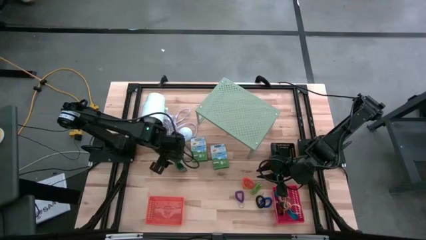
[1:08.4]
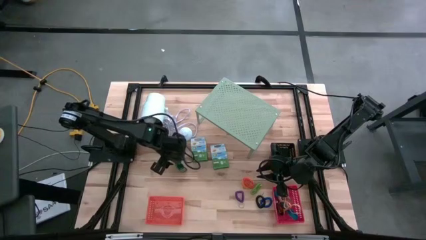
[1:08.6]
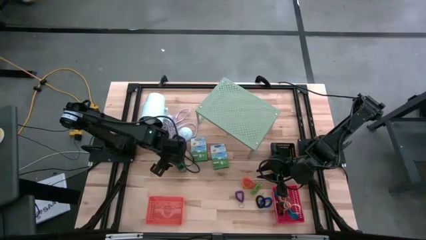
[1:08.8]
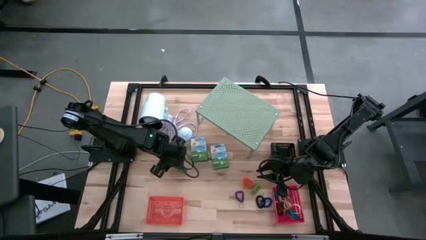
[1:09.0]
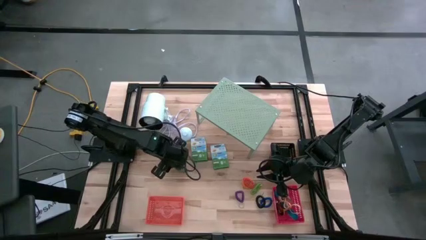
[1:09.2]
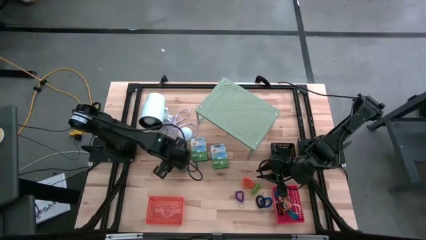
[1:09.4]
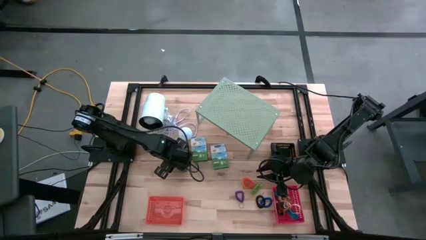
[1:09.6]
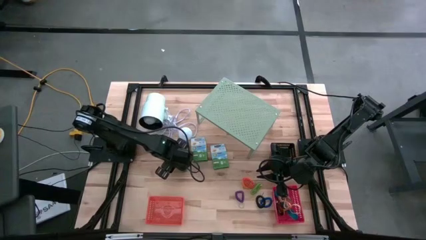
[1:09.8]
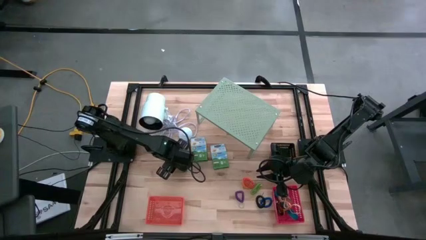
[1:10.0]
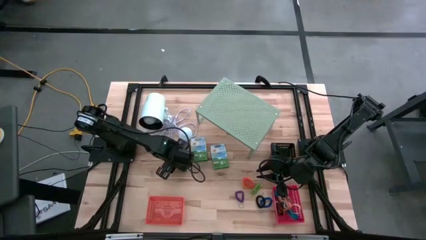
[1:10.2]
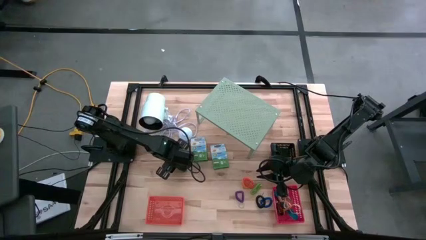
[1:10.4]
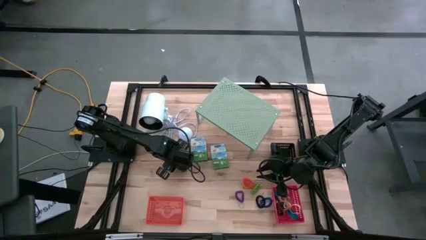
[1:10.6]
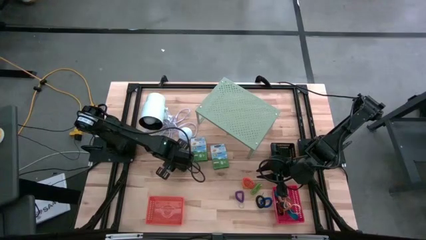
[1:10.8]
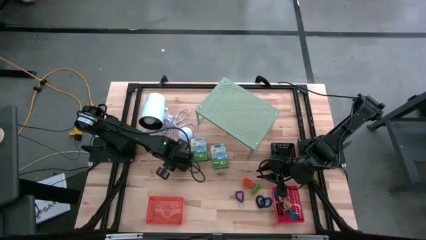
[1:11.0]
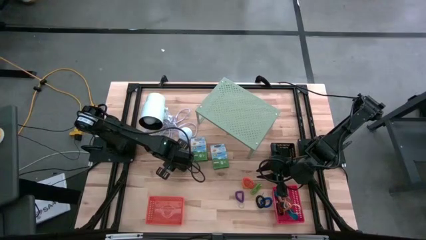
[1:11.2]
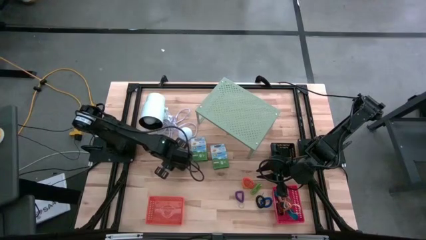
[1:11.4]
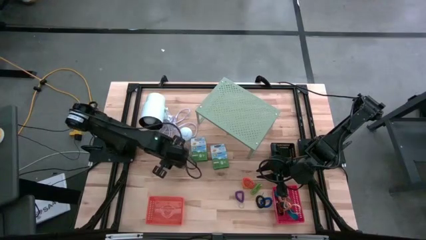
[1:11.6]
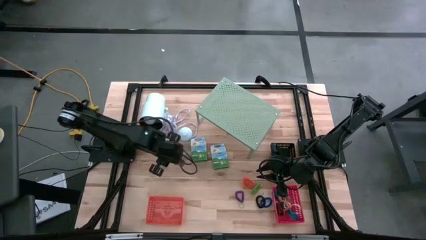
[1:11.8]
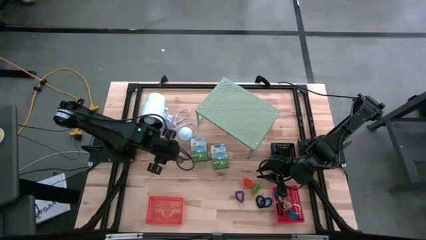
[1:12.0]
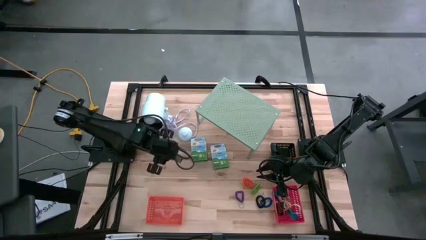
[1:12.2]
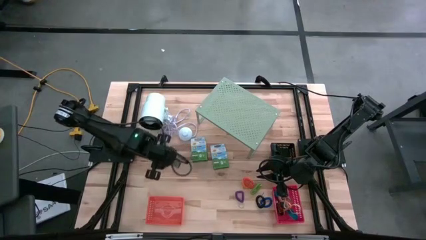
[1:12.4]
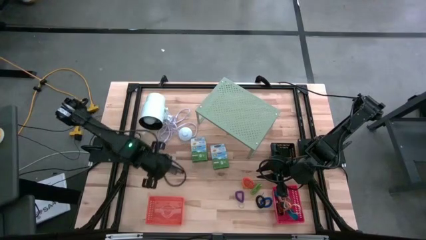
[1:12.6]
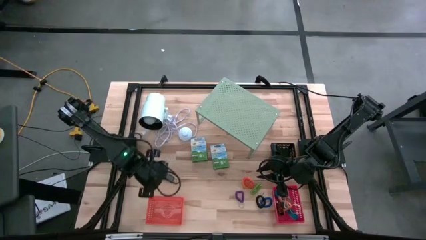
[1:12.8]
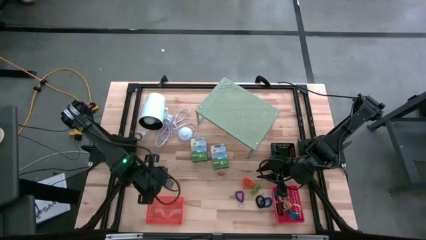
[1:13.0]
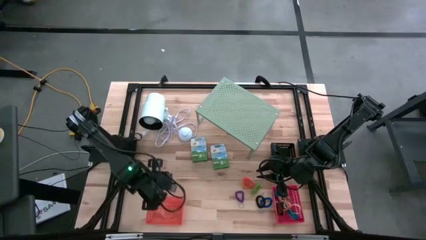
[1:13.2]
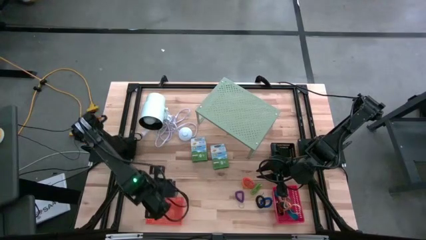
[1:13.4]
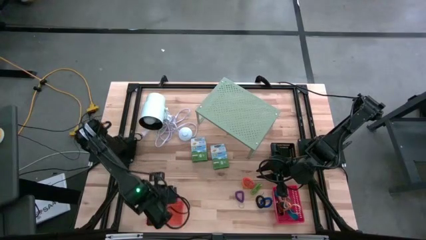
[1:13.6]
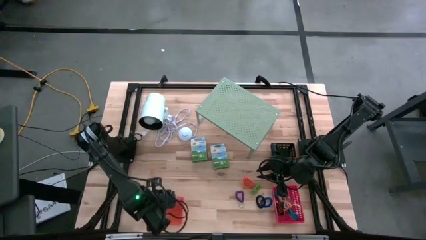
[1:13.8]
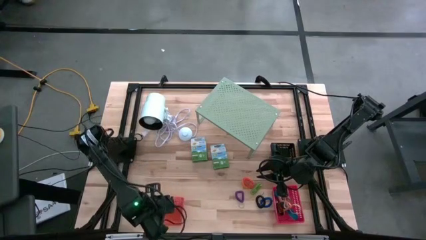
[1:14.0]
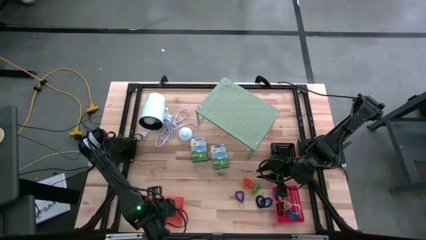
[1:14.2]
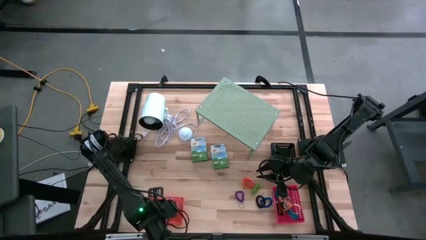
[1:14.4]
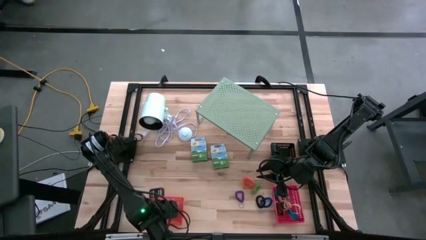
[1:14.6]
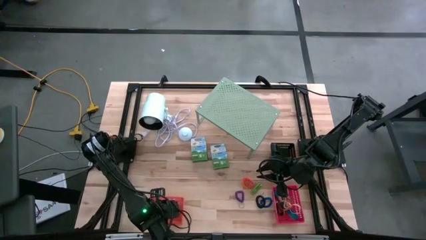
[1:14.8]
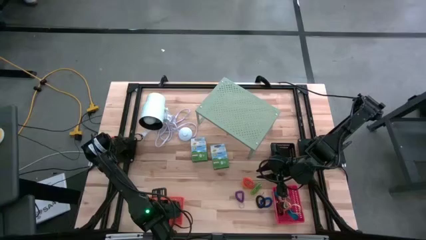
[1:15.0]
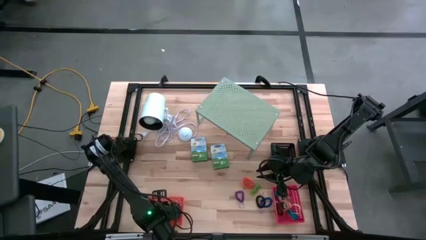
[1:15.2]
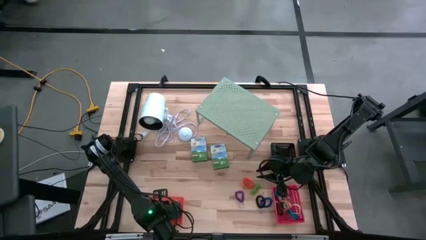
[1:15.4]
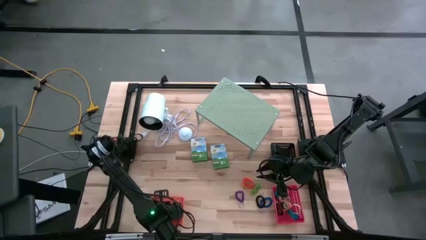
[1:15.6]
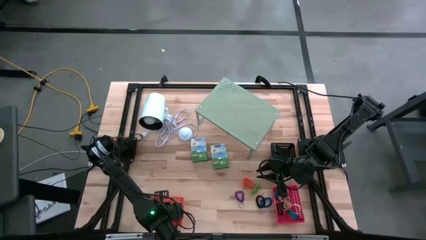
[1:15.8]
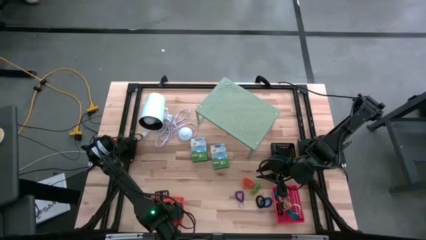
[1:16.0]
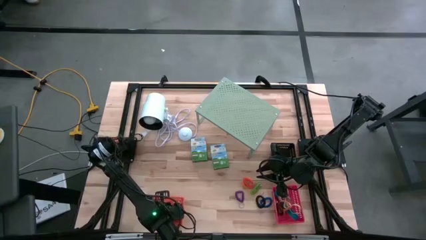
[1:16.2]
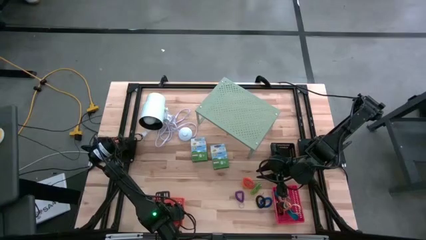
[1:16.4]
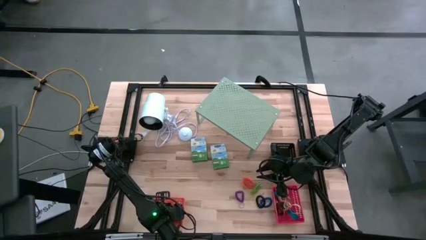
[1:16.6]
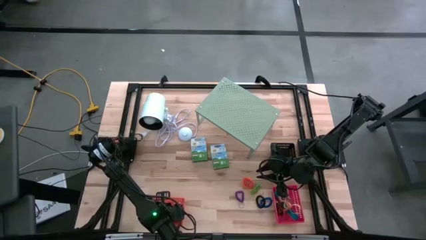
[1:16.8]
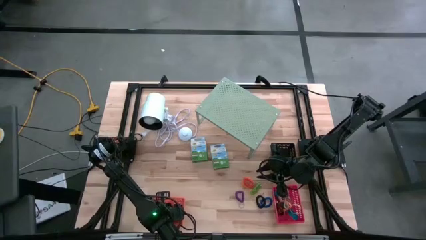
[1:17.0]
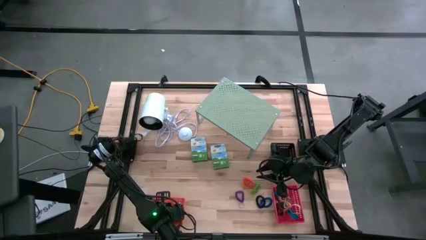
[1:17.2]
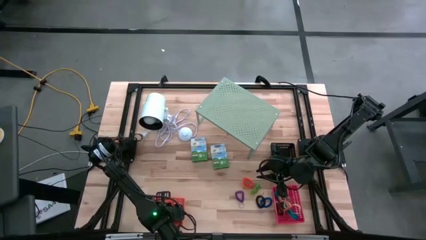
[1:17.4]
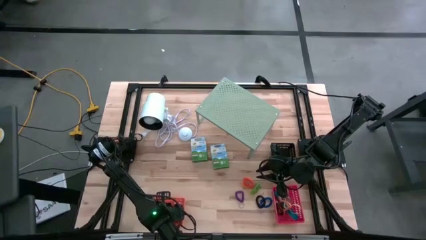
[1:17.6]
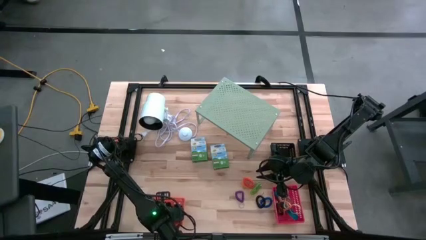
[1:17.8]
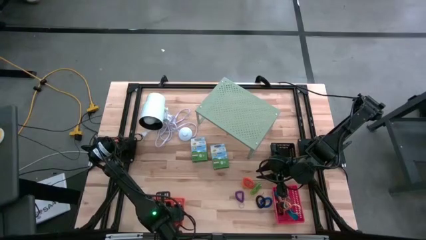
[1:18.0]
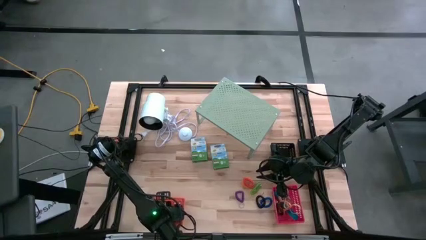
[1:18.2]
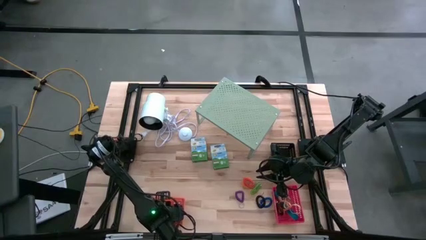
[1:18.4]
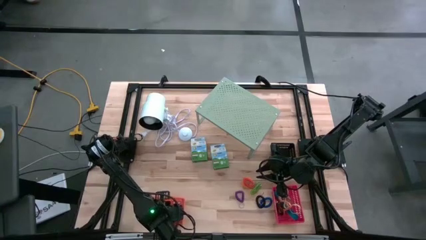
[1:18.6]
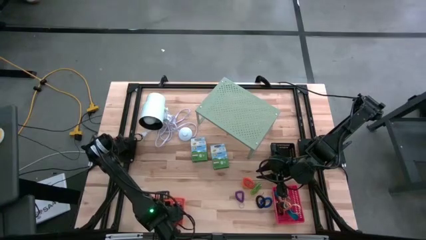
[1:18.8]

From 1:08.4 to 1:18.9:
Task: Pick & Place Office Desk Supplies
Put the left crayon box into the orange bin
